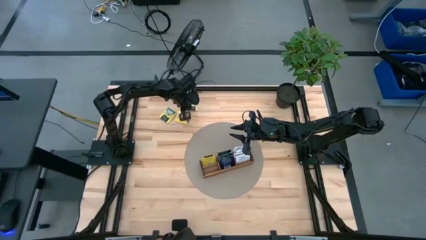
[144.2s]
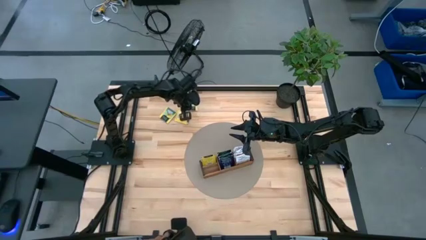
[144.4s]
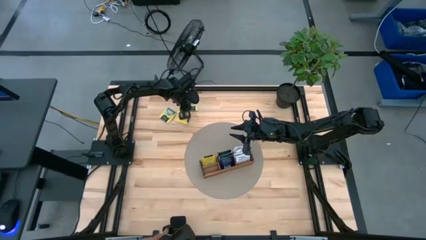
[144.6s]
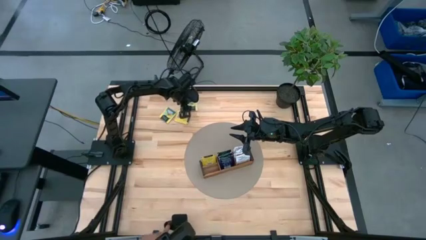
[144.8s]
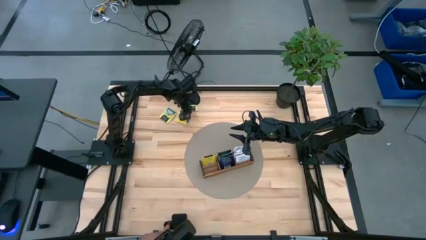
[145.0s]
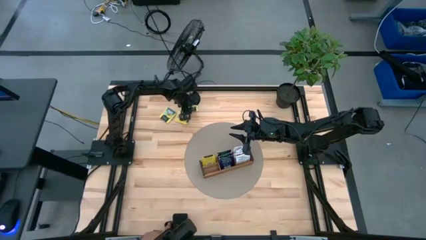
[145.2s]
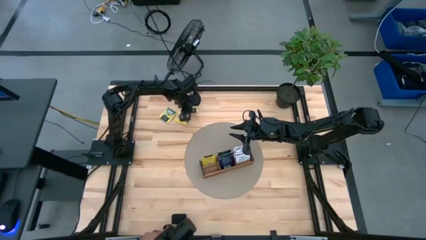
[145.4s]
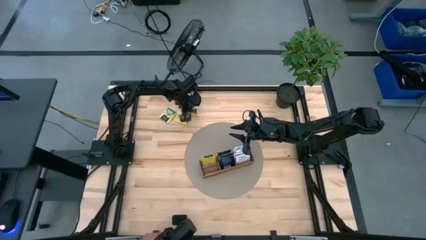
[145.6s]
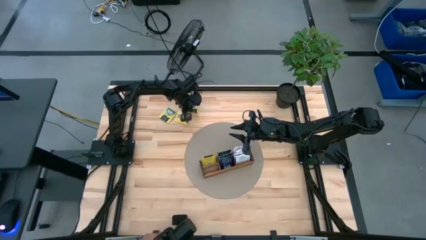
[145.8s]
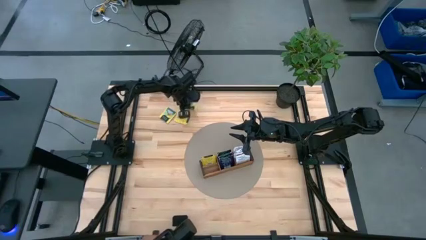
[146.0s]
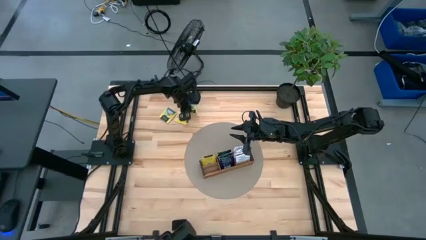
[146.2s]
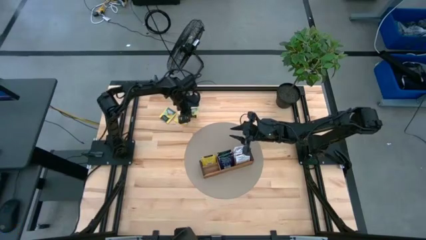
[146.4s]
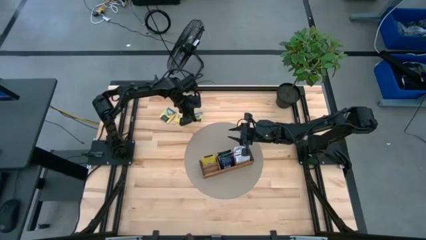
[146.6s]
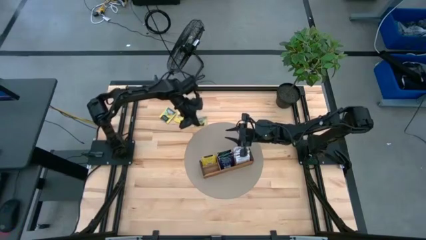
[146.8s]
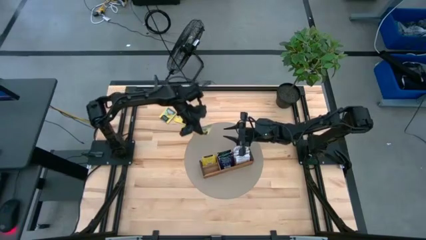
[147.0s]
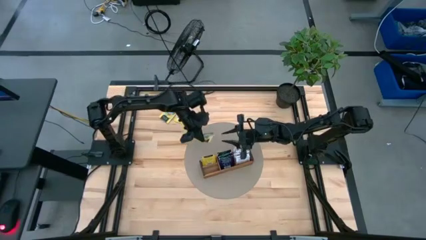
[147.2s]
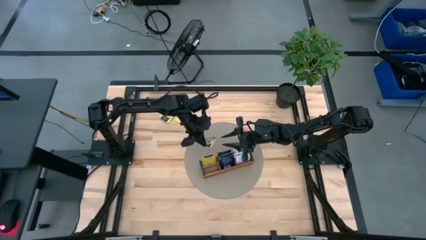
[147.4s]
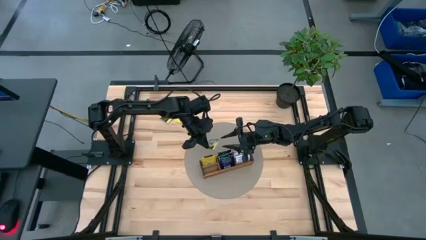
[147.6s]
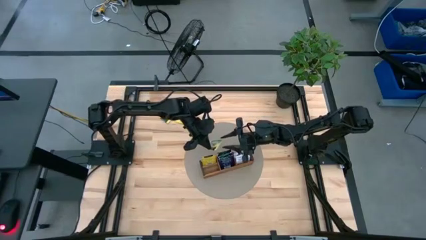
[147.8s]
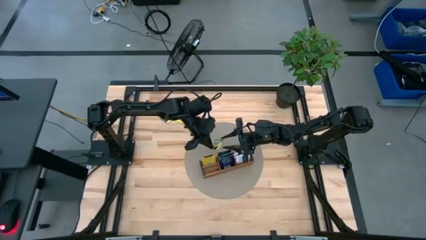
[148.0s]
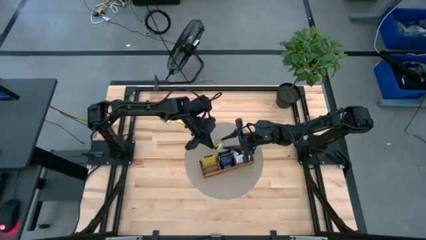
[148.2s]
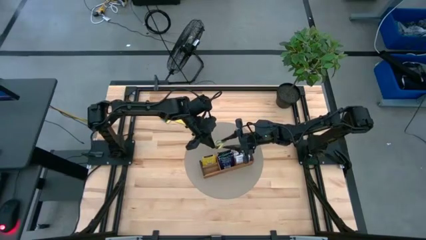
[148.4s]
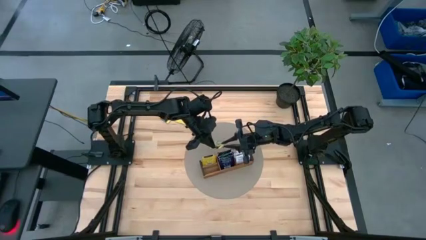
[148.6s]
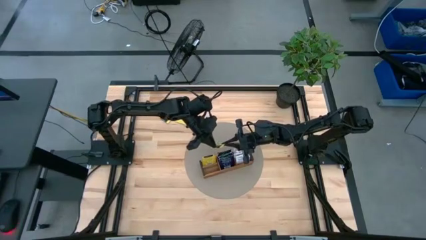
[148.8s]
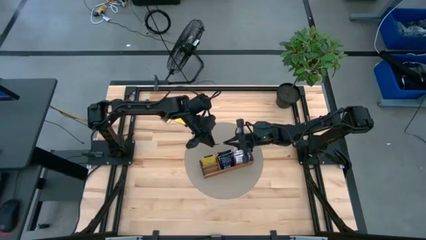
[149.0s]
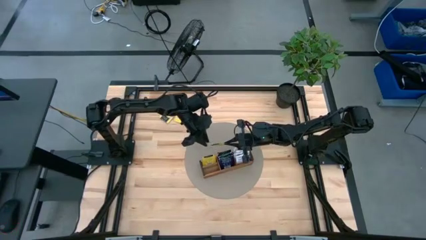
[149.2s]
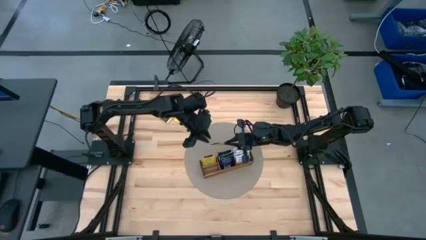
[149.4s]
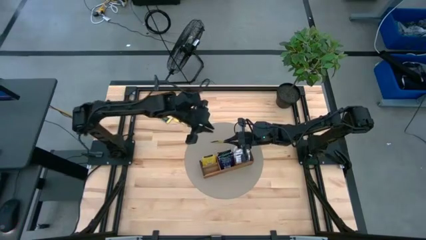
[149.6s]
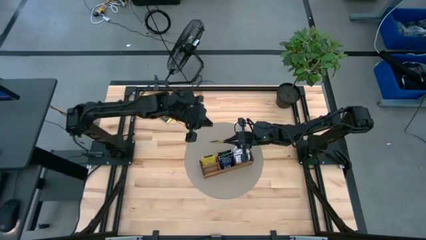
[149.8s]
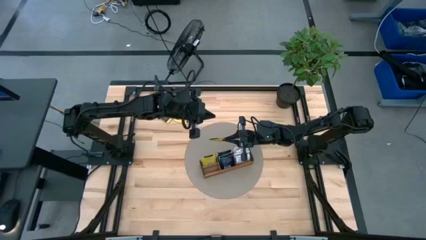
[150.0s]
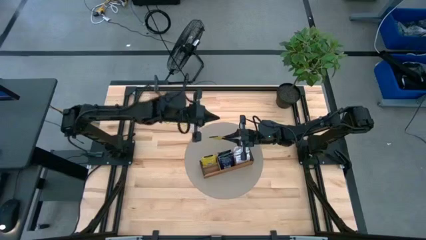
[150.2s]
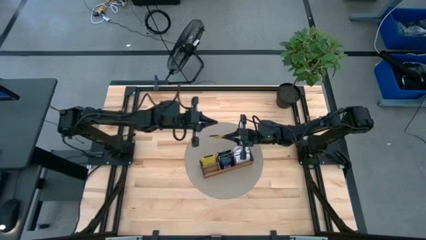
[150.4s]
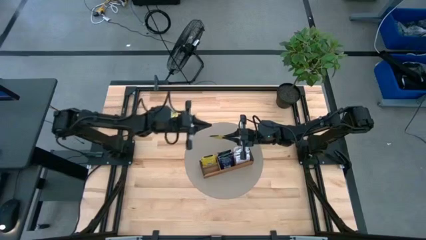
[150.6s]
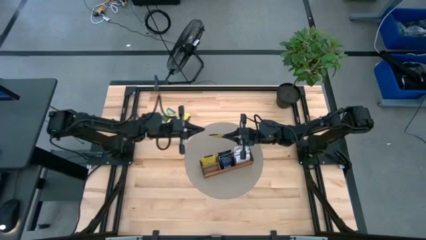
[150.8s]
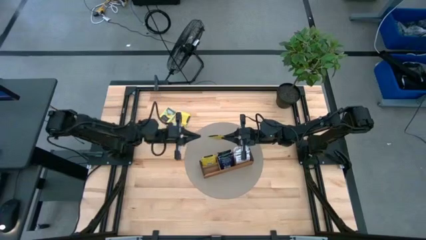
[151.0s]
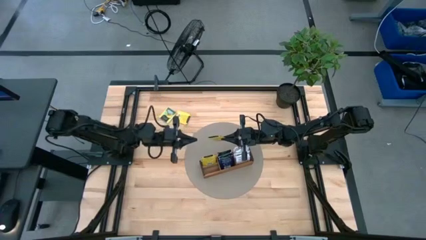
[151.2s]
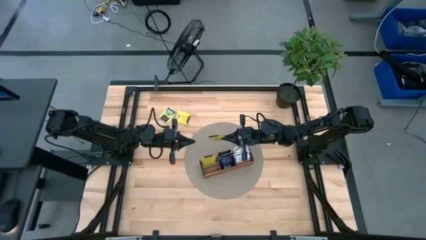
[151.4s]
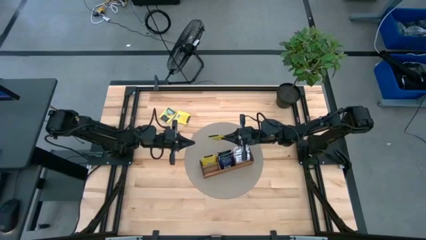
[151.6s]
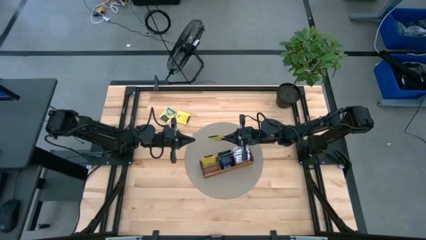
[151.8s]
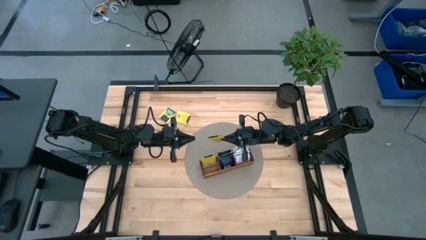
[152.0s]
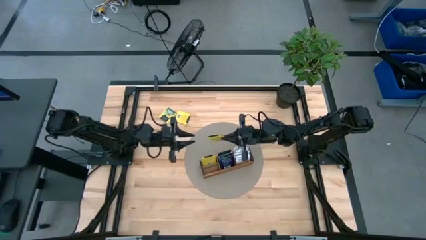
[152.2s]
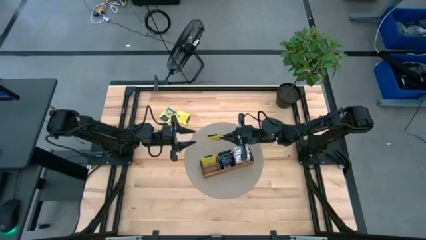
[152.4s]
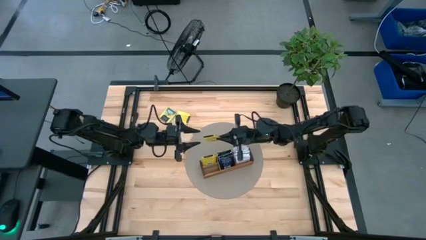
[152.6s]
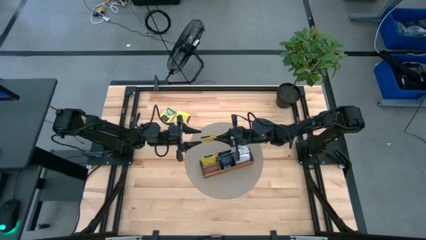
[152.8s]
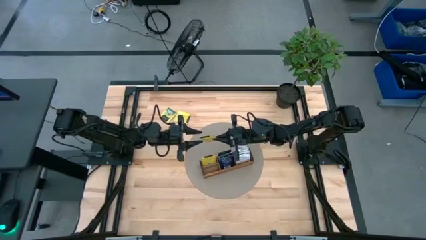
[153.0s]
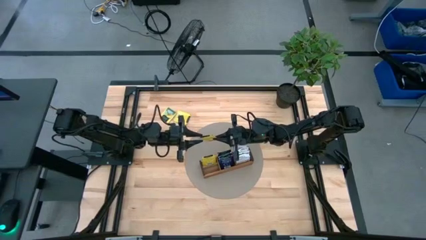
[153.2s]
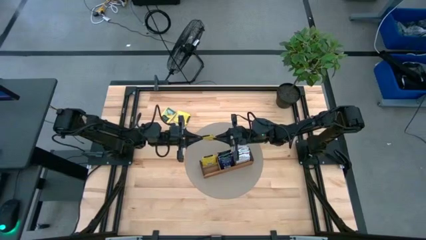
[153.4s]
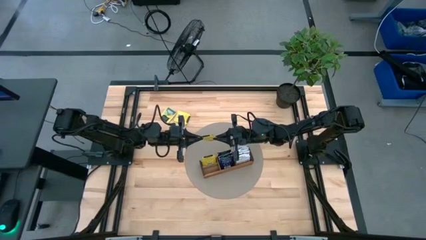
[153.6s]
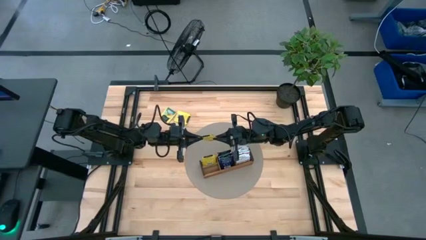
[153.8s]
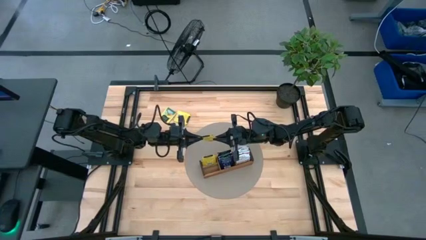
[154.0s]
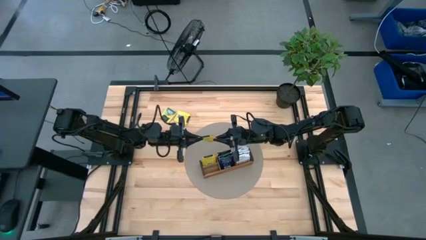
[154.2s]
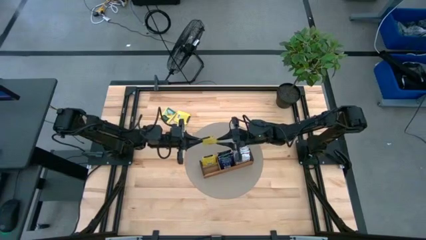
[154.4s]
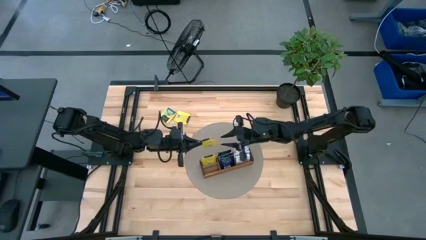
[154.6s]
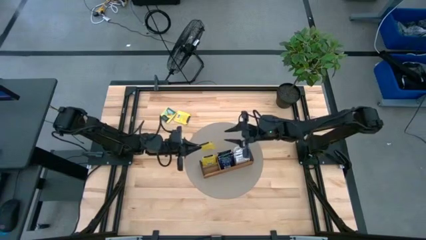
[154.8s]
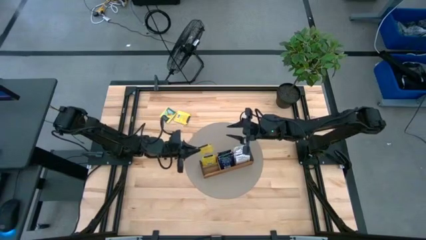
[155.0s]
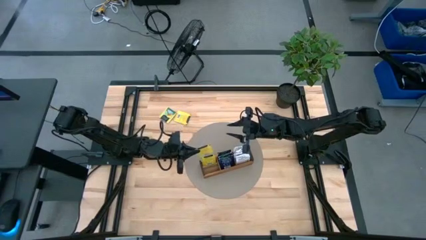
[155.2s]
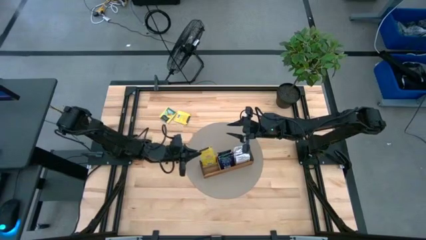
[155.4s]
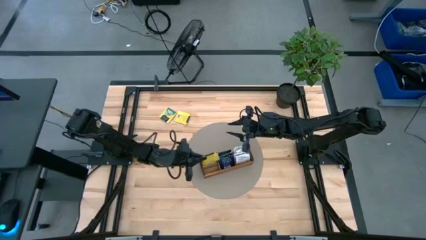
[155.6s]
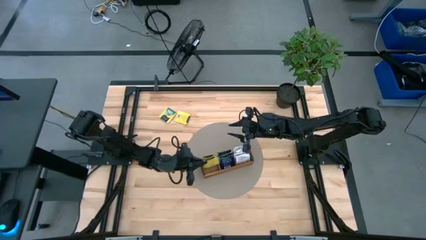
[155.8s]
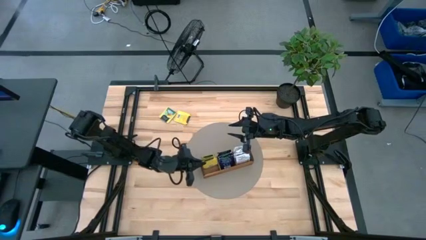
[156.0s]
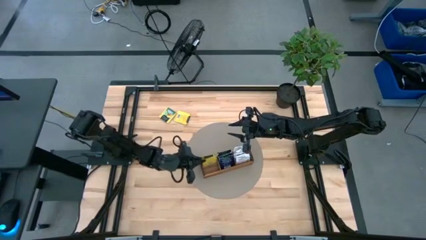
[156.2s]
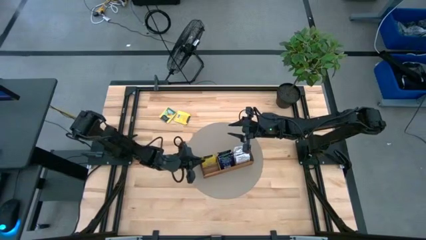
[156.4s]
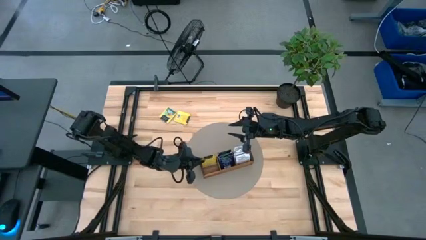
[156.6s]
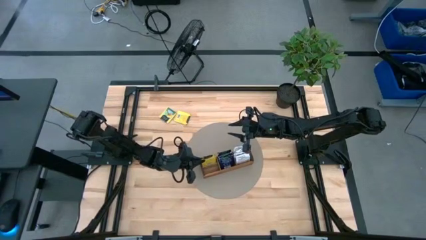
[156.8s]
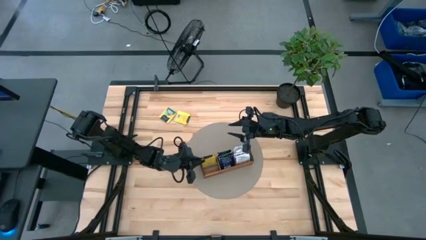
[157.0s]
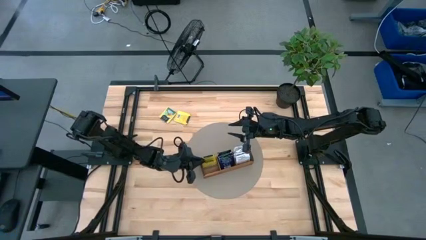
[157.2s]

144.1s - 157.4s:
Task: Pick & Place Tea
Put the yellow tea bag into the left section of the wooden organizer

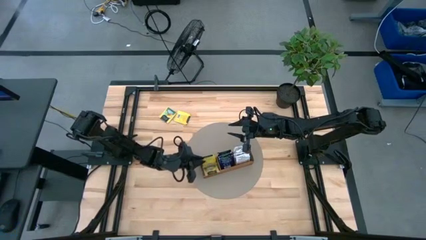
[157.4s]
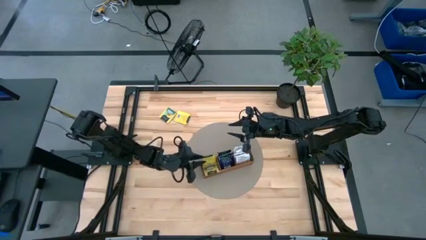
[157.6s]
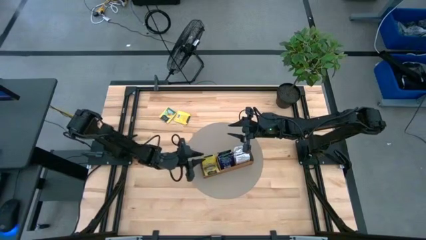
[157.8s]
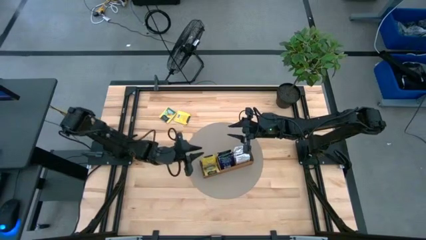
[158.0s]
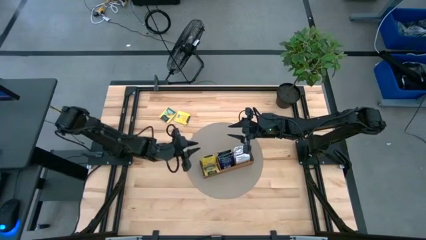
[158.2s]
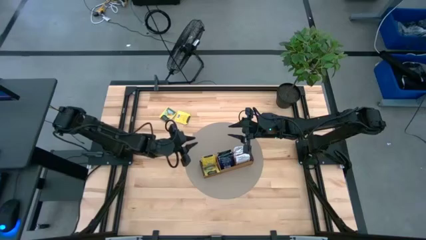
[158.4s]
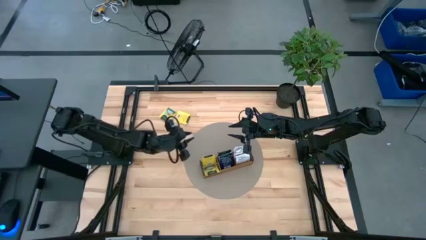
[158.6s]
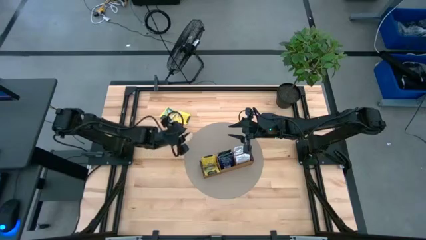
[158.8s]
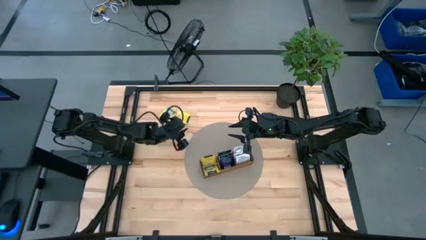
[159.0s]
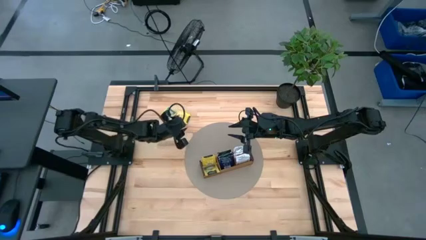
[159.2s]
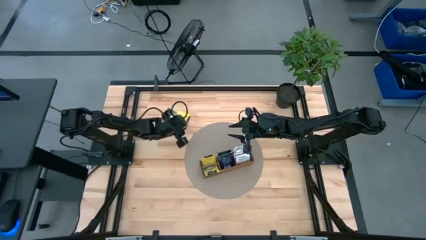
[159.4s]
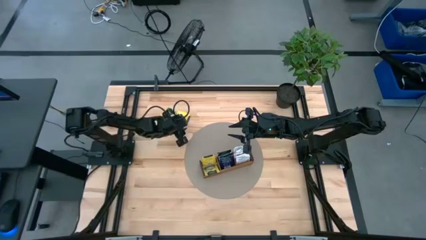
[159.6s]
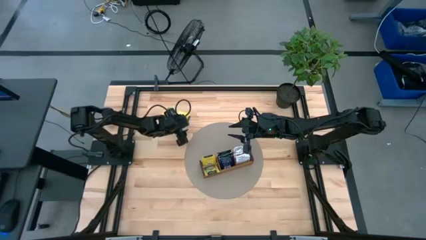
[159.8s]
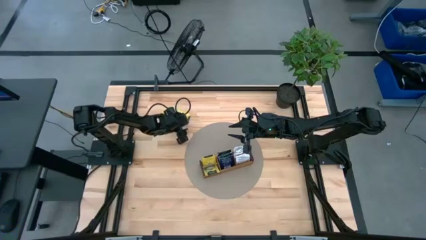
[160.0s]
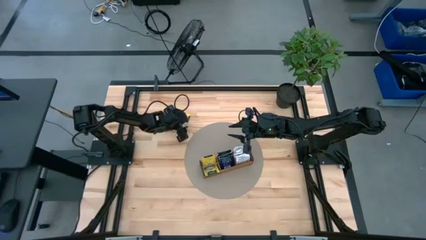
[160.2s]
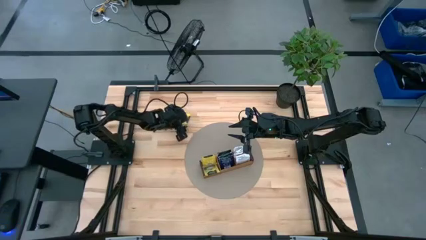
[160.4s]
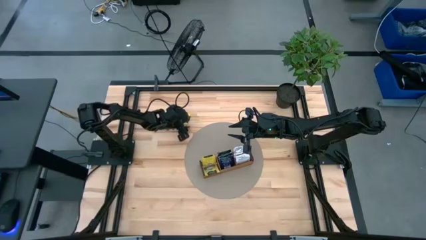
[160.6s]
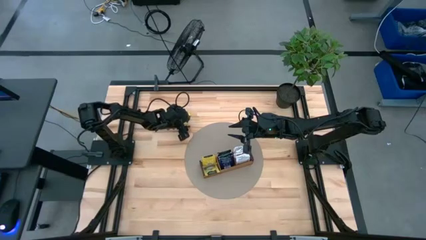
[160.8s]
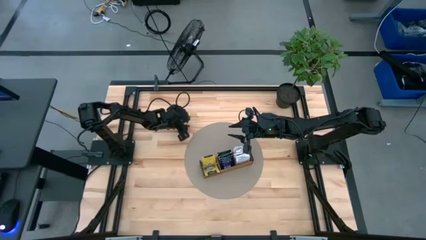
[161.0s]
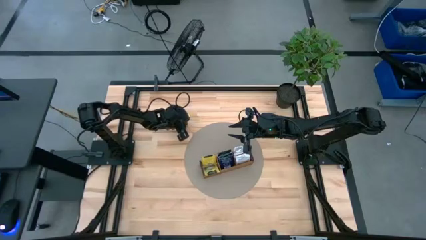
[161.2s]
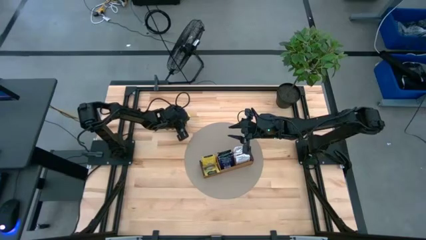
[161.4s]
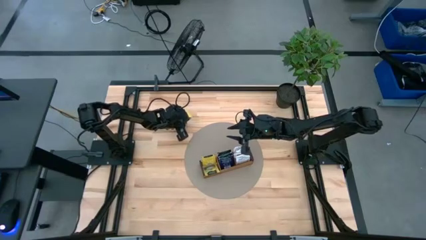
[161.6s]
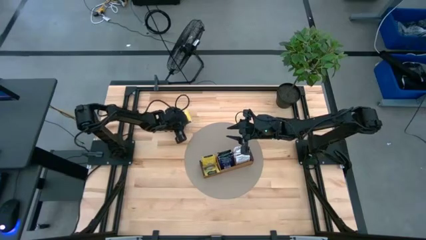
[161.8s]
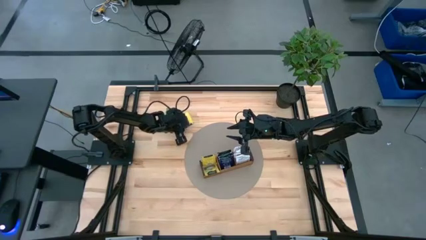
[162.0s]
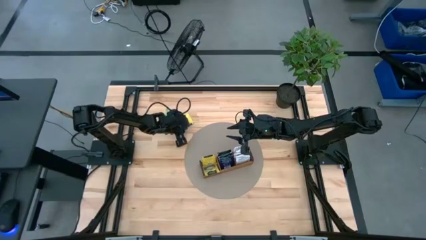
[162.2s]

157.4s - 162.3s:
Put the yellow tea bag into the left section of the wooden organizer
